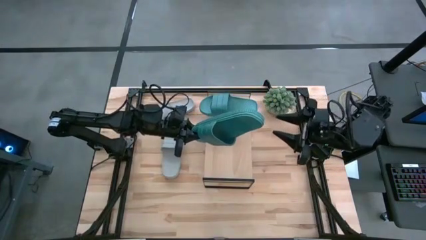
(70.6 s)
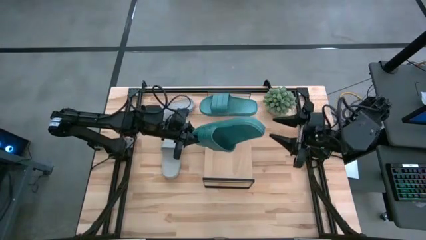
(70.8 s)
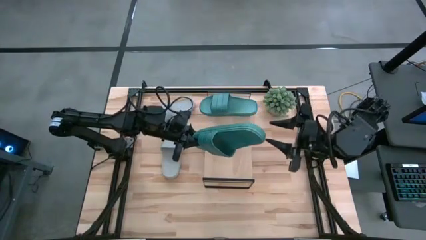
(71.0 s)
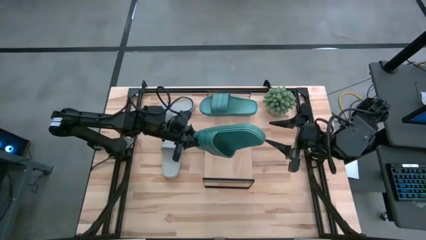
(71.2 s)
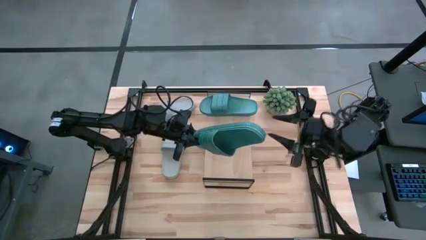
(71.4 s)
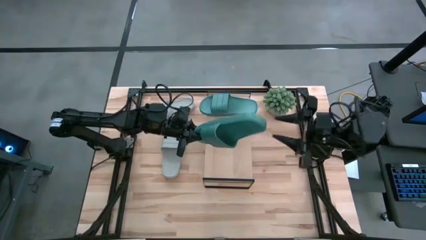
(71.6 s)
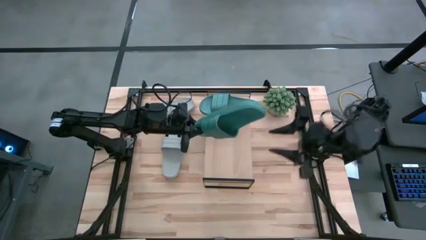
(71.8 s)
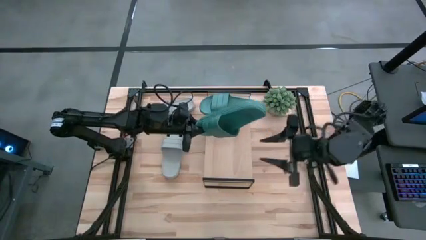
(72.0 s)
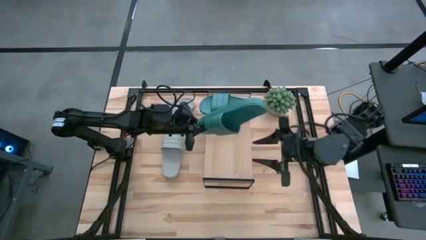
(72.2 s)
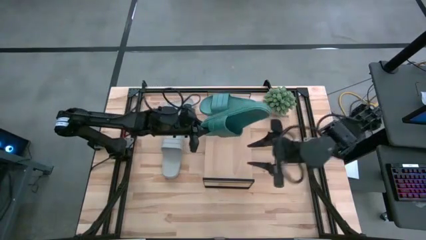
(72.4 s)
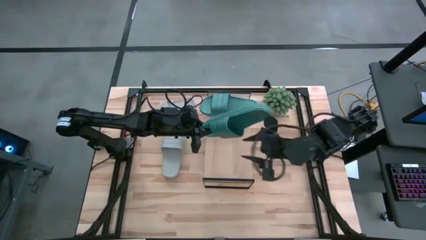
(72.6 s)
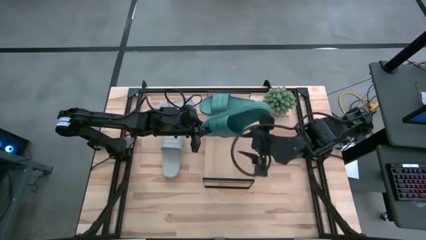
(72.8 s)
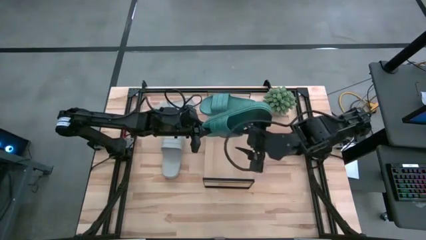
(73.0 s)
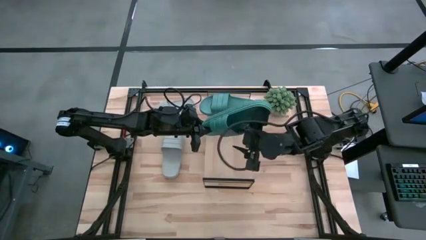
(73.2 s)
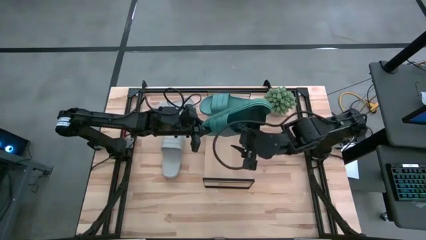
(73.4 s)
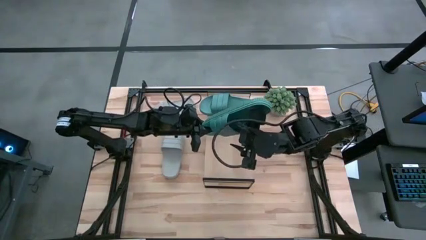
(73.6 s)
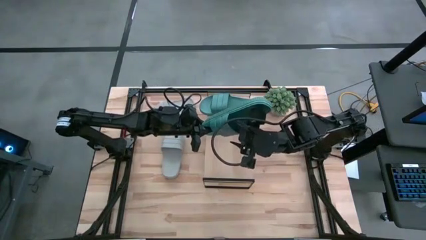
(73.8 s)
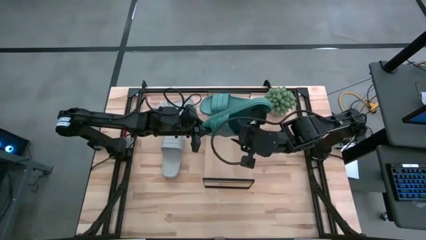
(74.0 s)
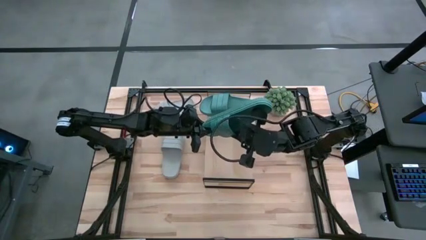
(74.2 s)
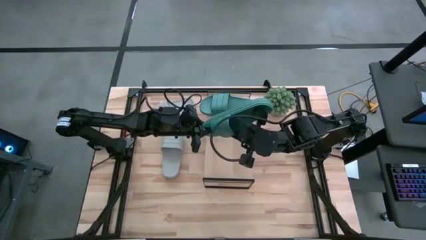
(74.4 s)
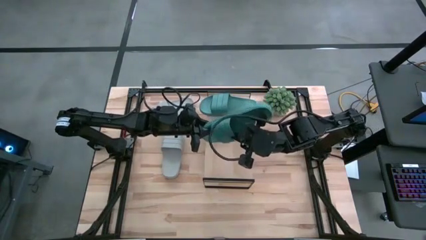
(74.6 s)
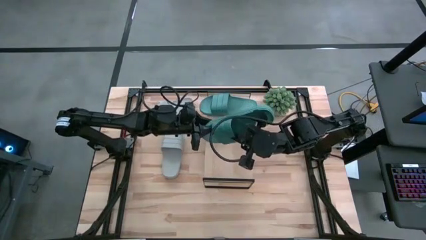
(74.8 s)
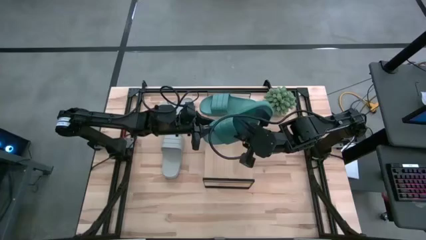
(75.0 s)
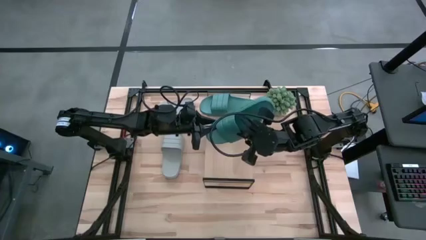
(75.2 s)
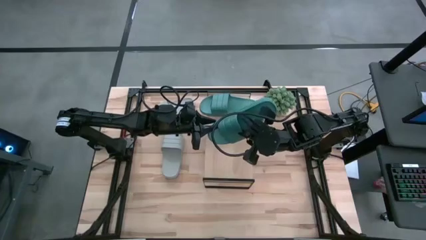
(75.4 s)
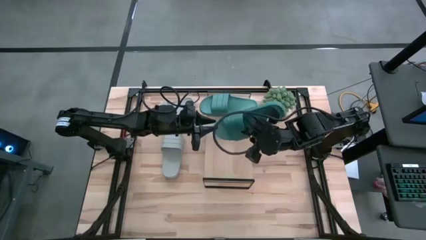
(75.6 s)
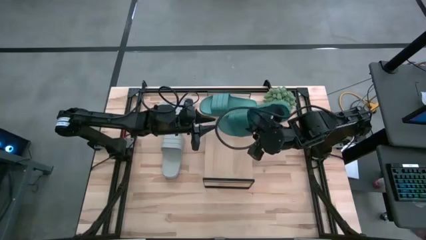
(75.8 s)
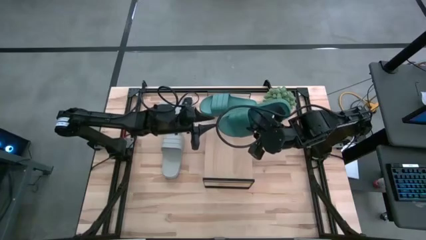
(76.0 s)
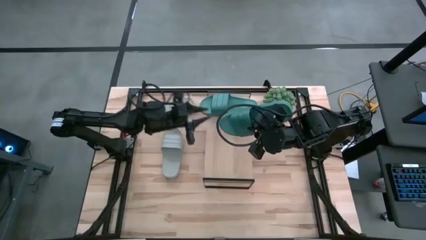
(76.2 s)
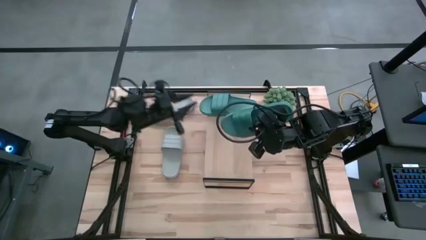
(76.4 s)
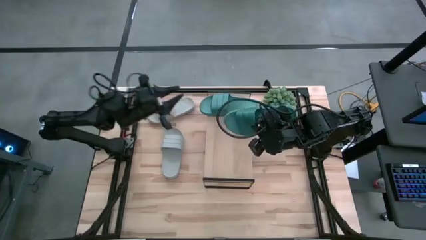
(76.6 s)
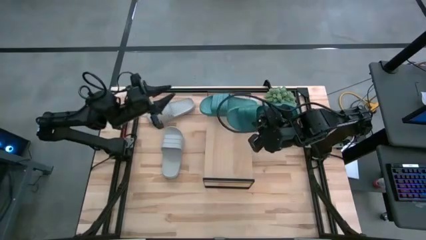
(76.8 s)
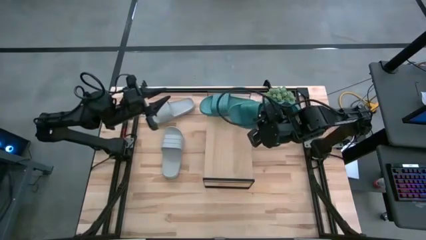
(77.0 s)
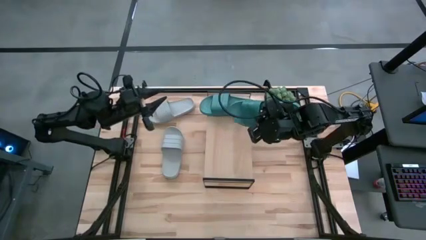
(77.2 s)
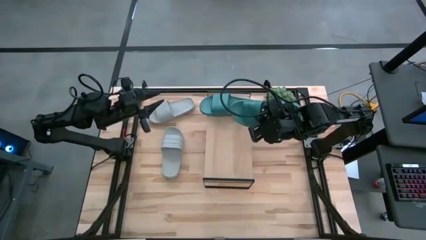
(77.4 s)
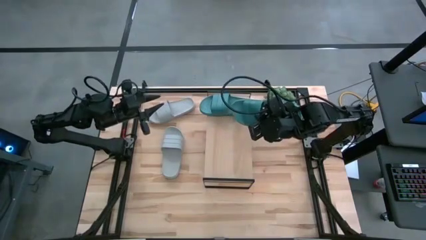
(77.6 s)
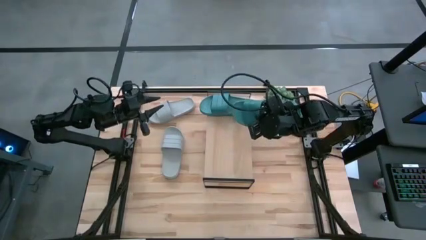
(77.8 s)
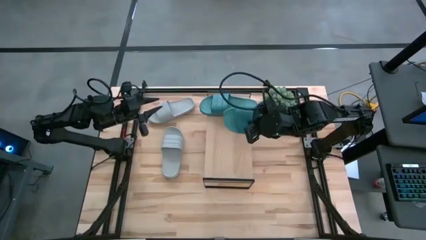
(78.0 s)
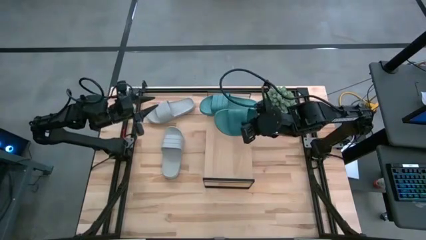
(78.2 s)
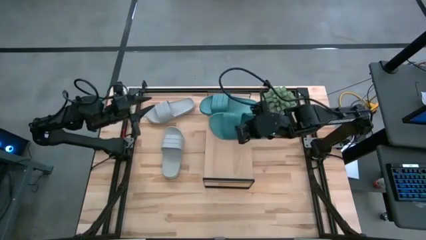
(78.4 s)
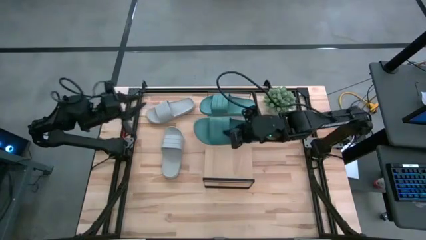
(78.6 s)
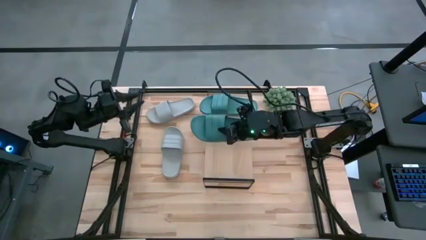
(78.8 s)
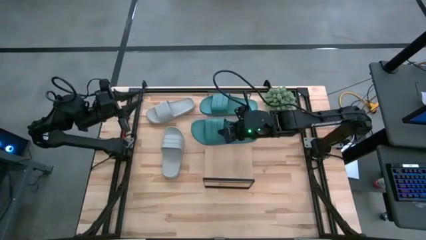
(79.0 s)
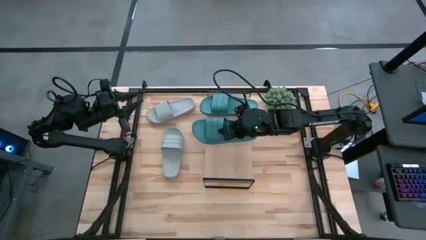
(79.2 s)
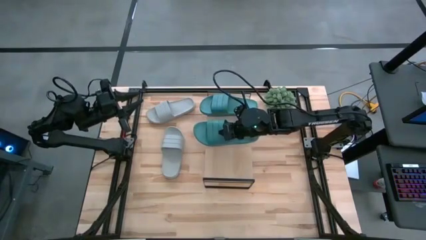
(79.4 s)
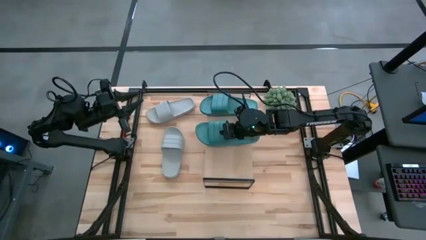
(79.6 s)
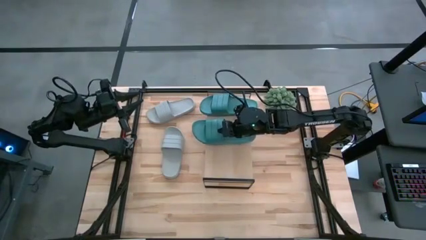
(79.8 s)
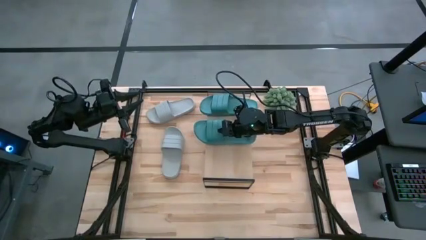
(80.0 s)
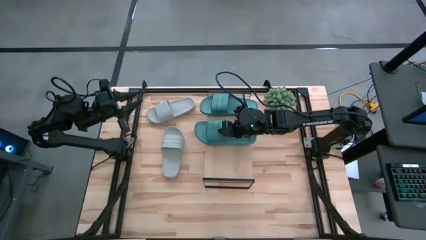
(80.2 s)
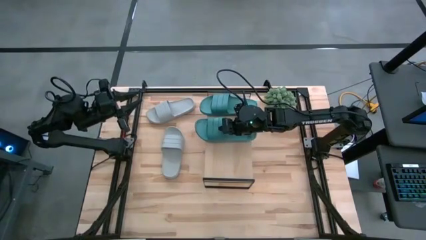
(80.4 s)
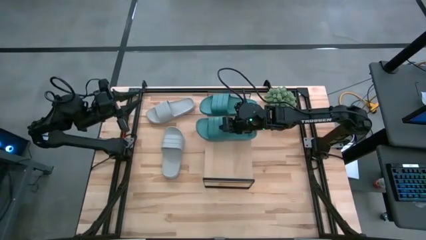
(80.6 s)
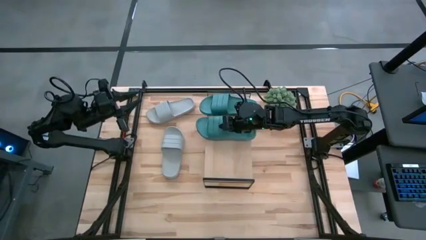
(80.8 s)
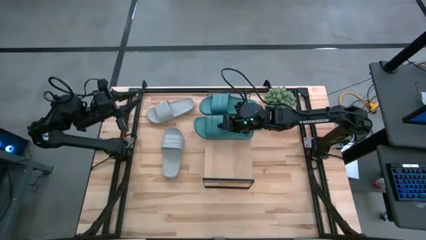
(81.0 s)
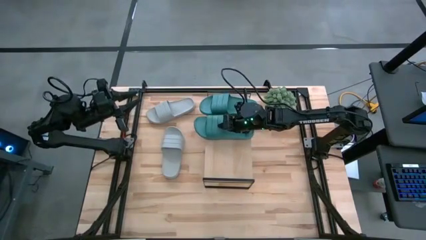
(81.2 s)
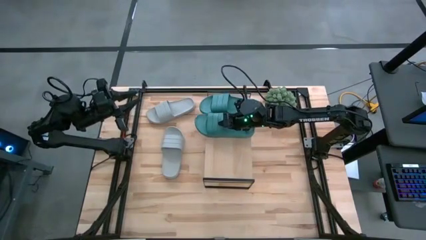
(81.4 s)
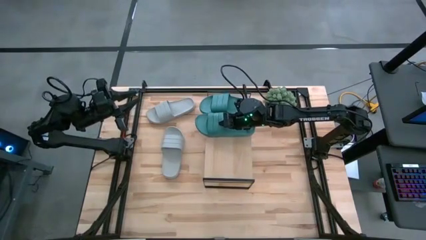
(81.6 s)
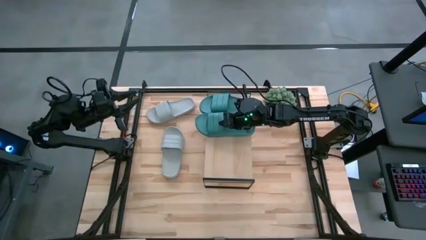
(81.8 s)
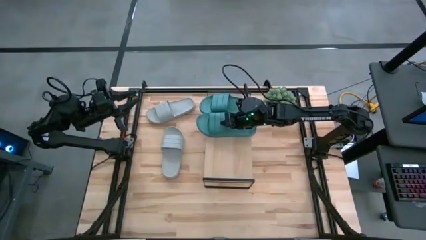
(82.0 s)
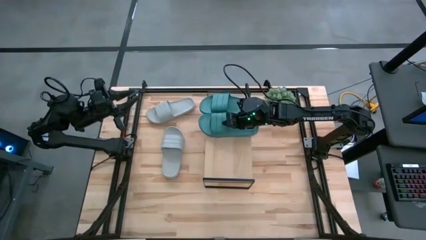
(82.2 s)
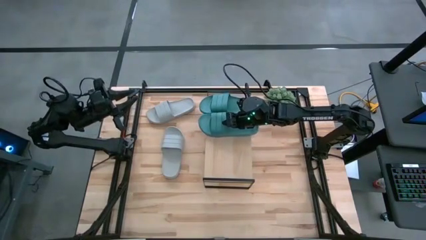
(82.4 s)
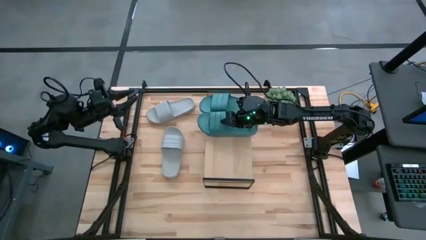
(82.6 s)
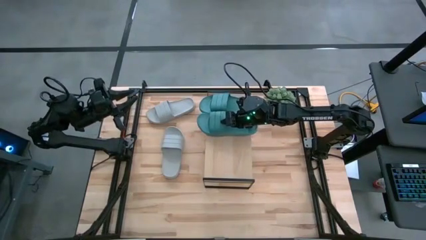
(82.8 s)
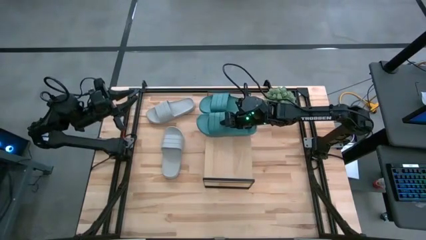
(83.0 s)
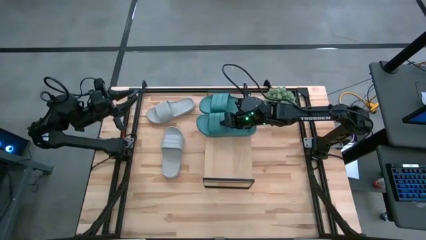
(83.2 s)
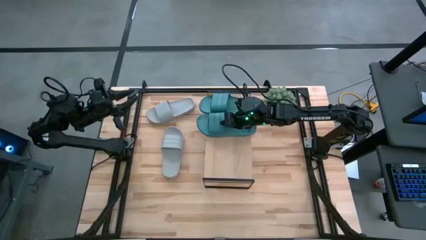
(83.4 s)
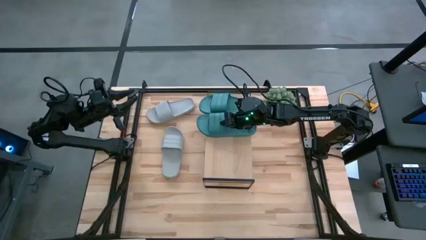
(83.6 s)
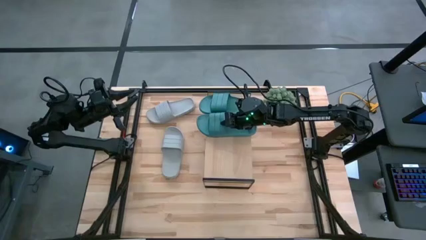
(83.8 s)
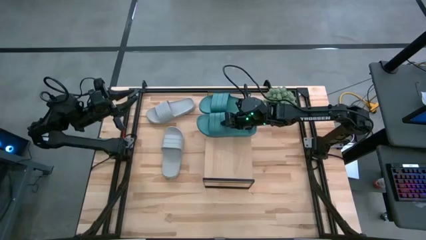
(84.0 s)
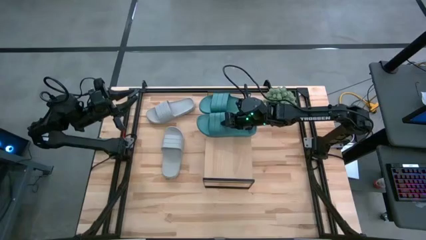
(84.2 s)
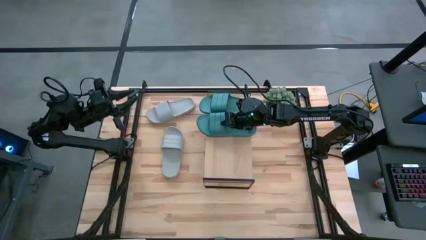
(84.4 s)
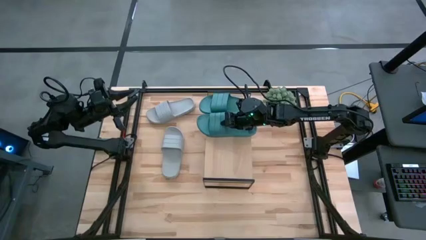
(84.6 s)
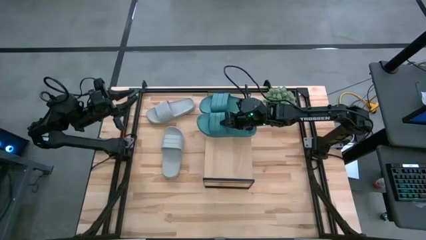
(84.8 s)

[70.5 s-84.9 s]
Task: Pick and place slides into the shelf
Put the green slide on the shelf
